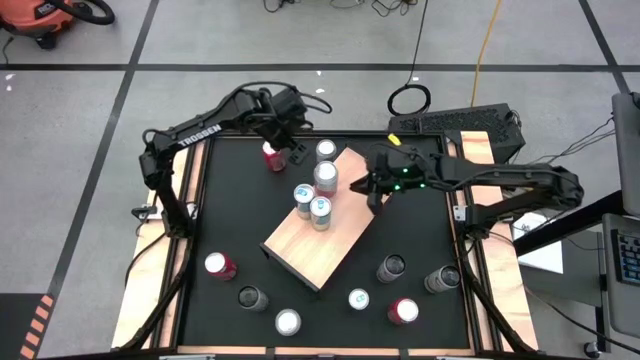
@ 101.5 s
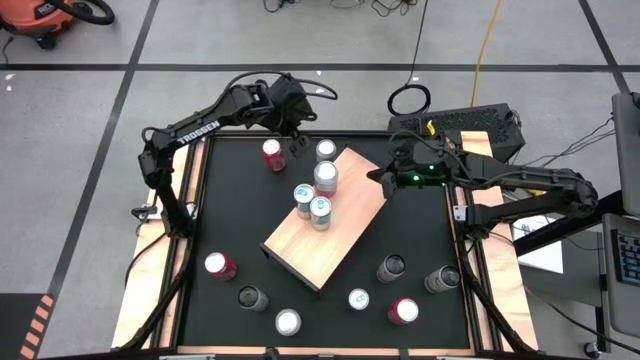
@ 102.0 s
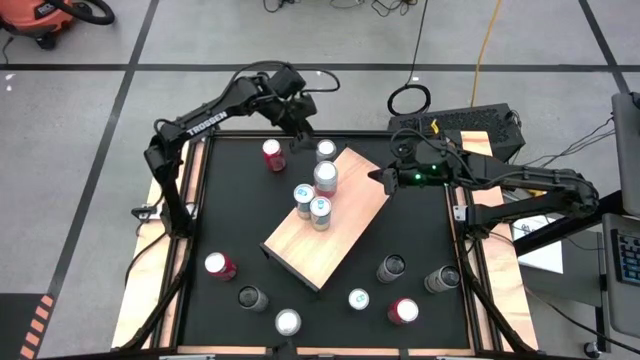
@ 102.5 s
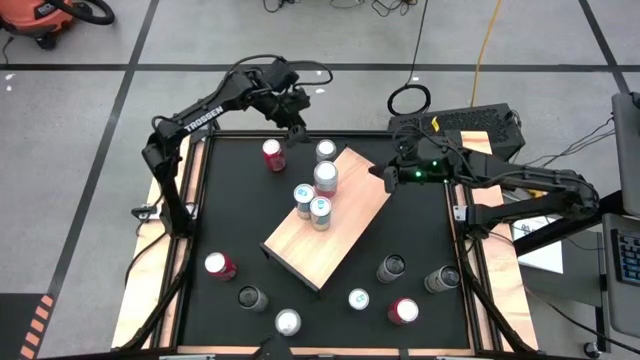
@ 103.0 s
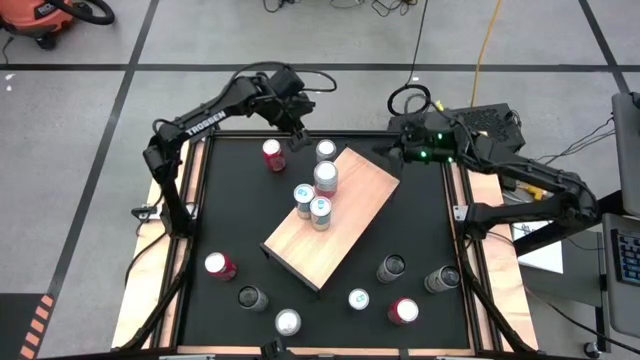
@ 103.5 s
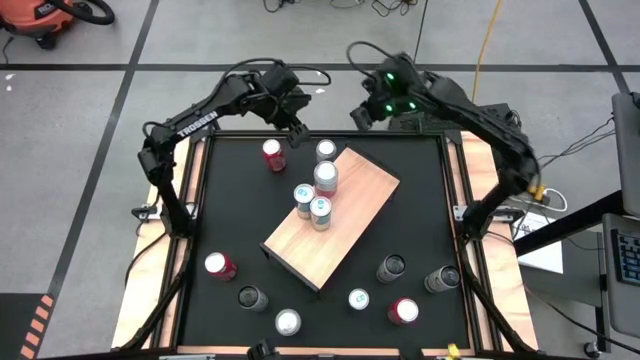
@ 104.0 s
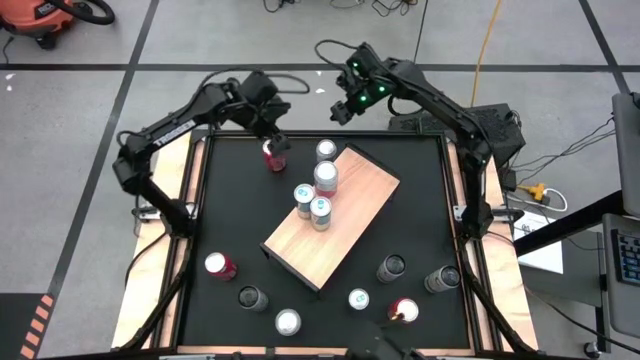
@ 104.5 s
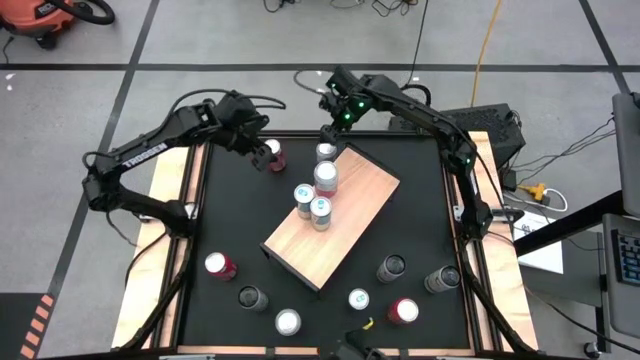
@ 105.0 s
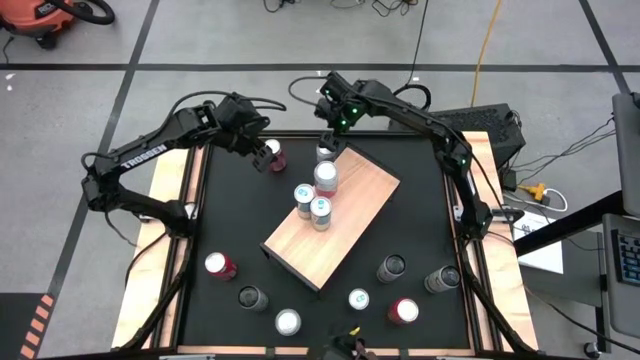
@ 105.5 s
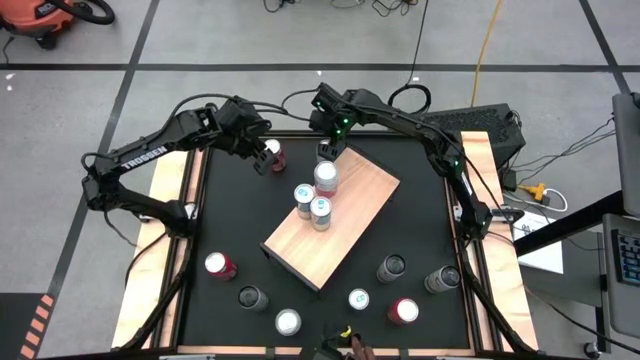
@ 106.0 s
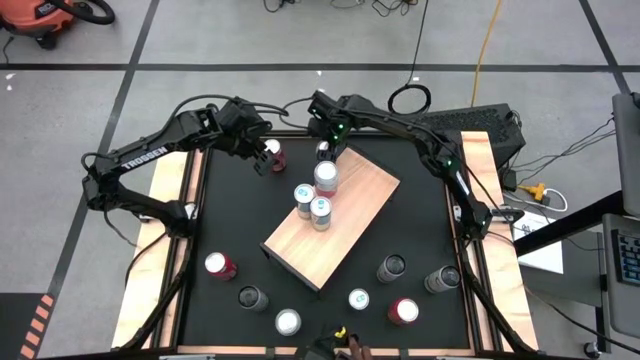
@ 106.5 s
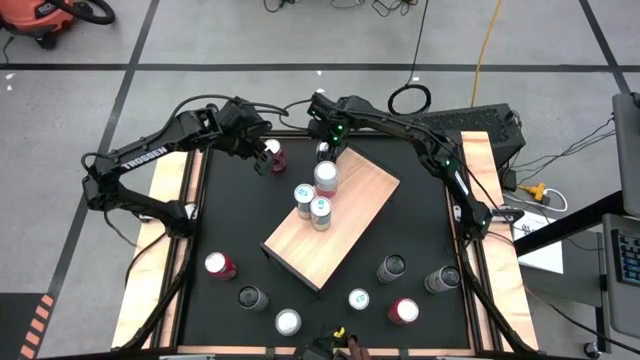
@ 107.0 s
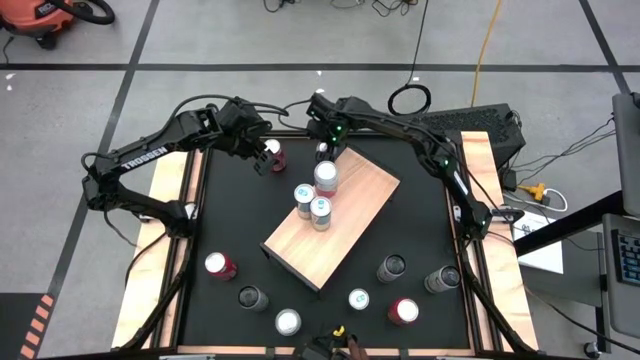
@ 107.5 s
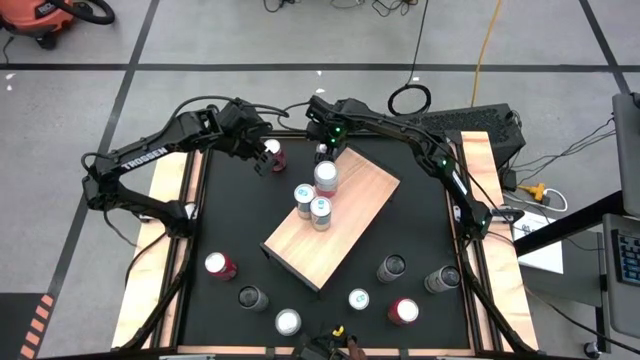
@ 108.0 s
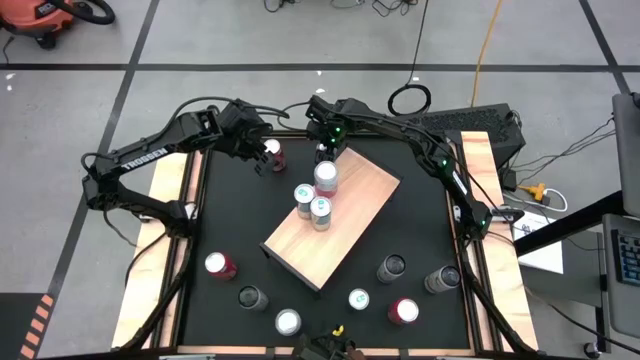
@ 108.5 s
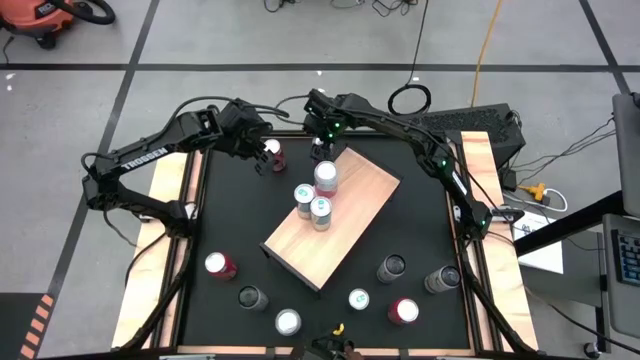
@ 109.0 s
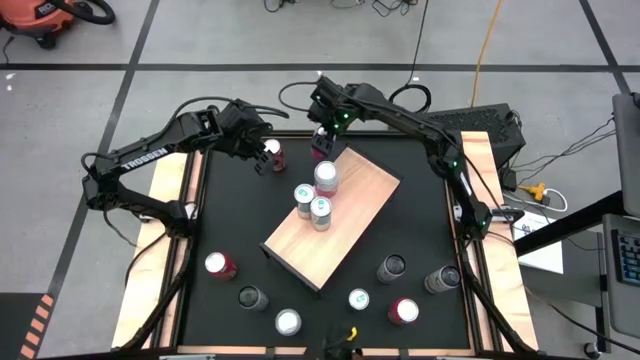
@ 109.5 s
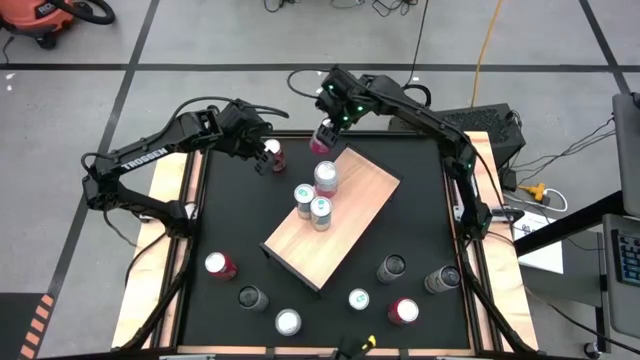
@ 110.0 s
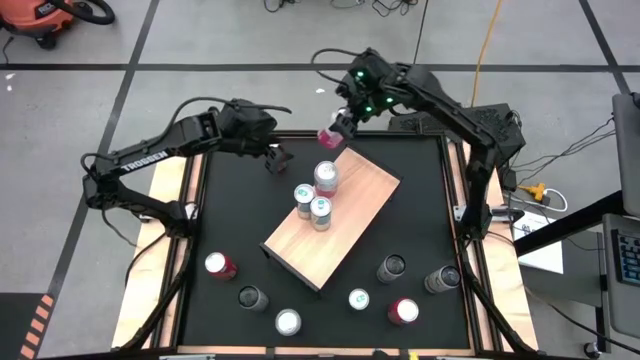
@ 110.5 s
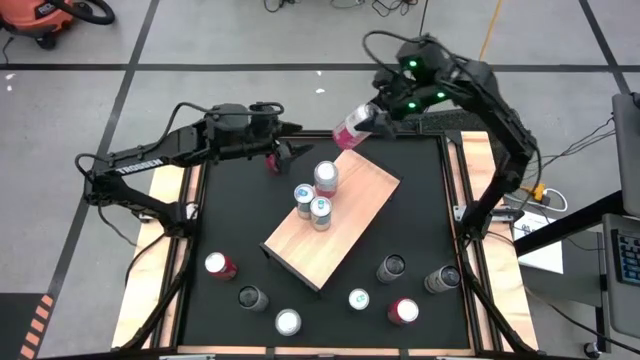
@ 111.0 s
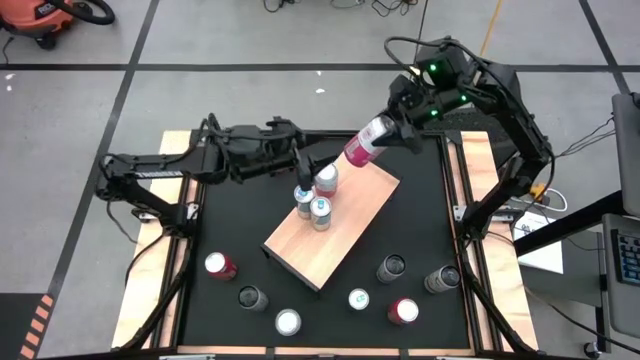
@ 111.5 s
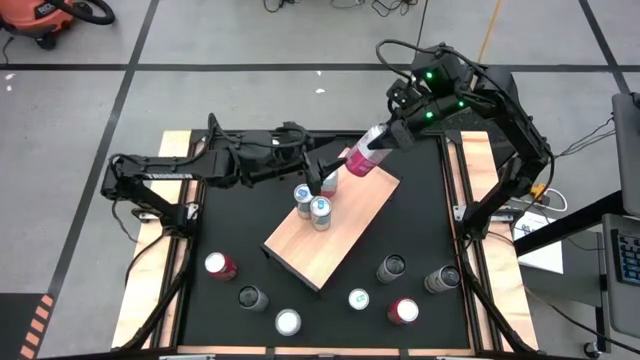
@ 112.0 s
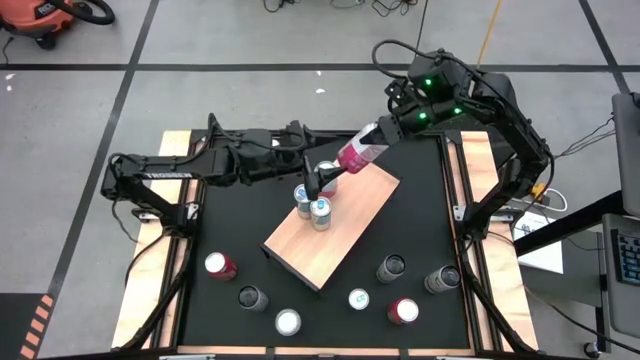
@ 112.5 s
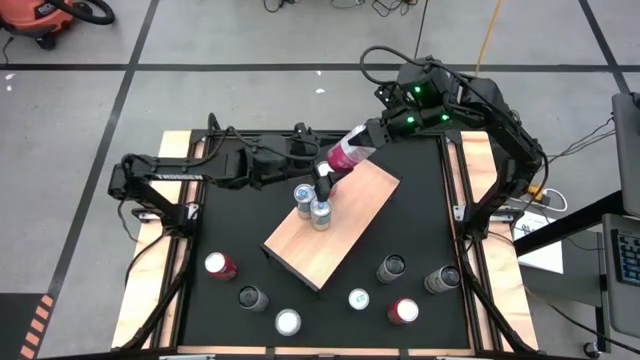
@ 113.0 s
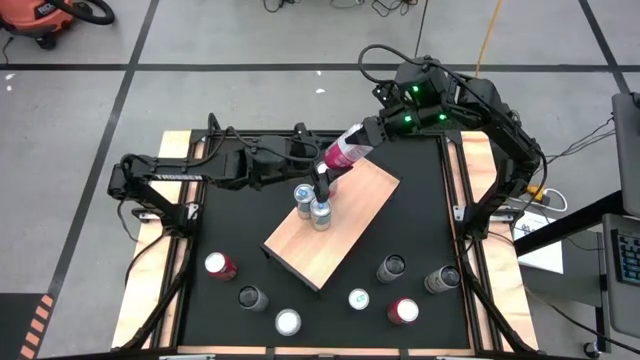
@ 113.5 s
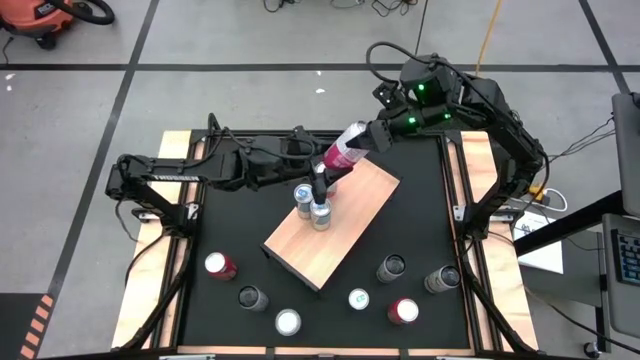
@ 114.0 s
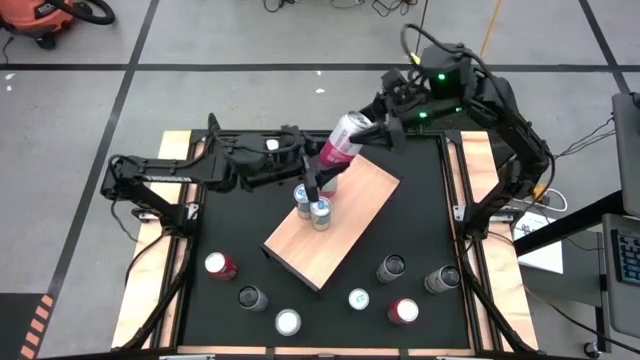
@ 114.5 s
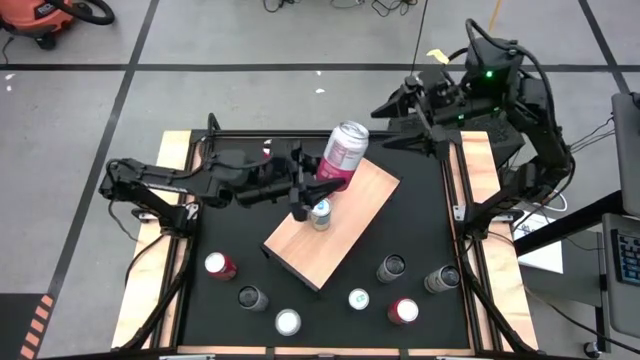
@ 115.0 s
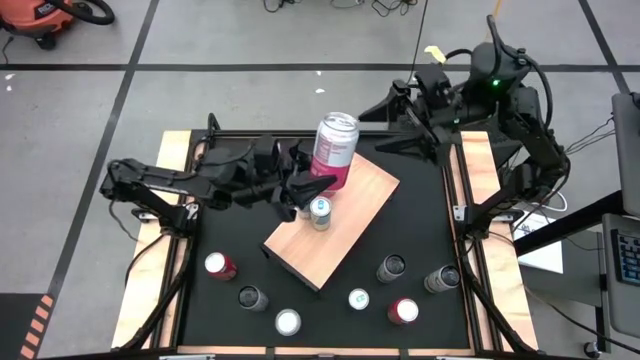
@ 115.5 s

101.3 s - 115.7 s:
Task: Place canned beverage on shelf
Put the top pink-white soda can on the shelf aligned with the pink-white soda can

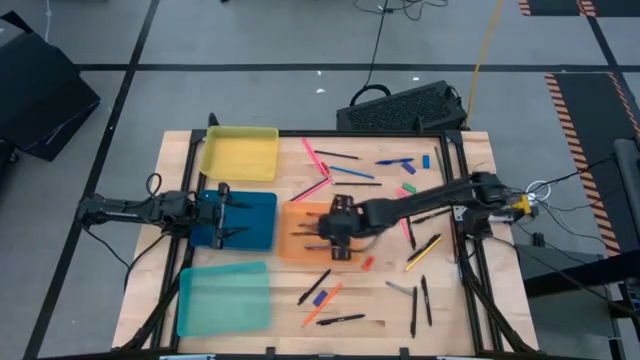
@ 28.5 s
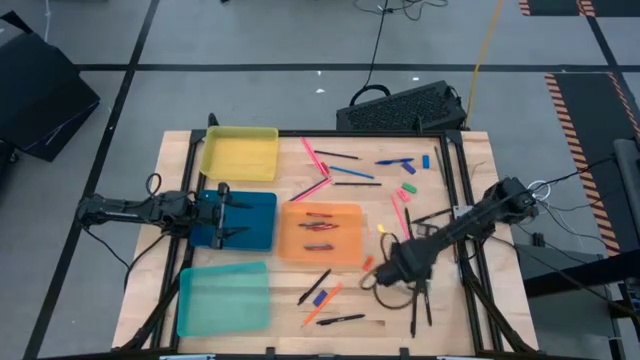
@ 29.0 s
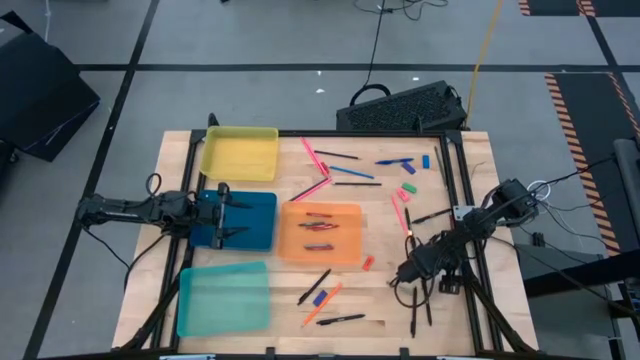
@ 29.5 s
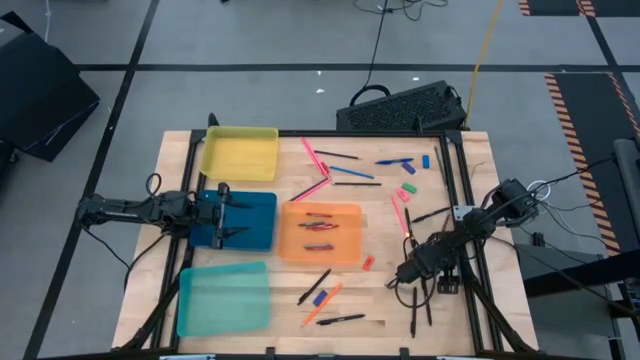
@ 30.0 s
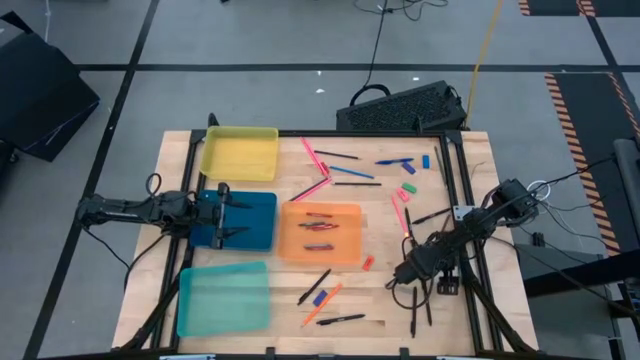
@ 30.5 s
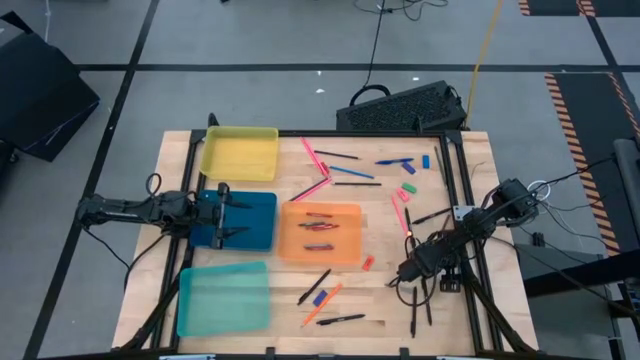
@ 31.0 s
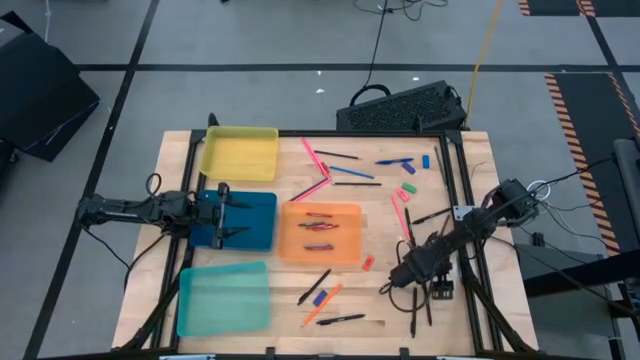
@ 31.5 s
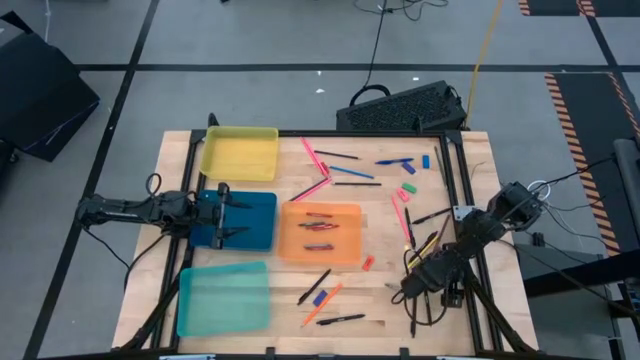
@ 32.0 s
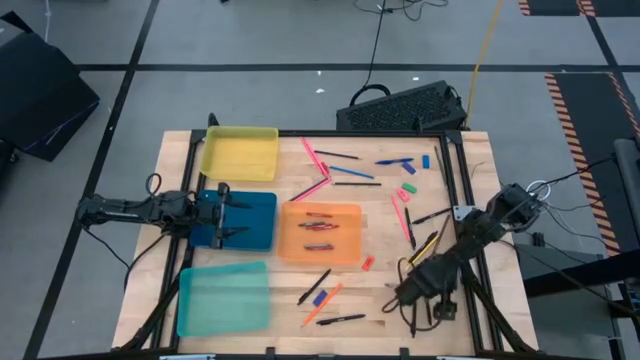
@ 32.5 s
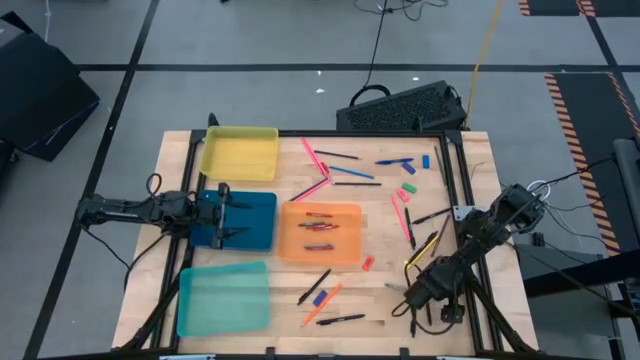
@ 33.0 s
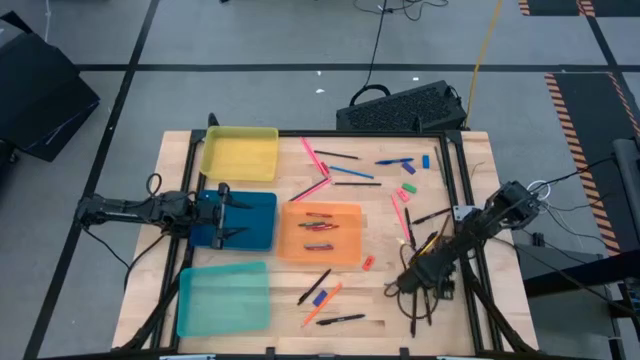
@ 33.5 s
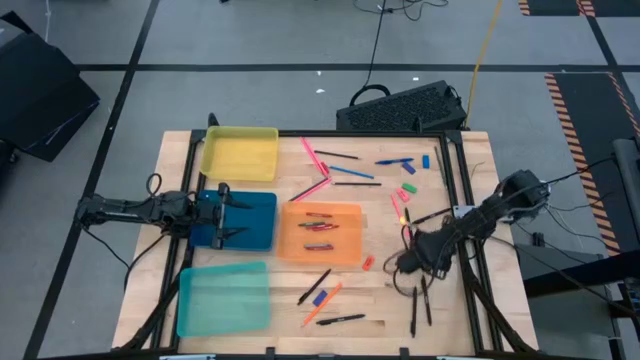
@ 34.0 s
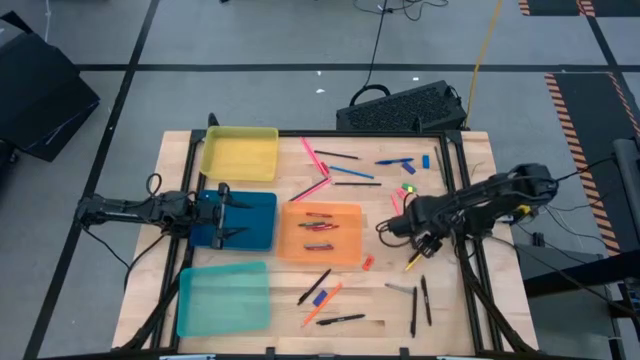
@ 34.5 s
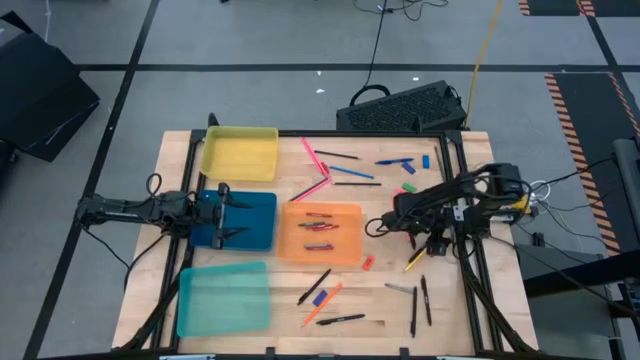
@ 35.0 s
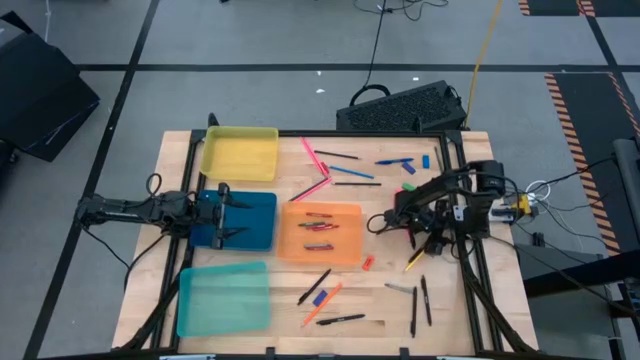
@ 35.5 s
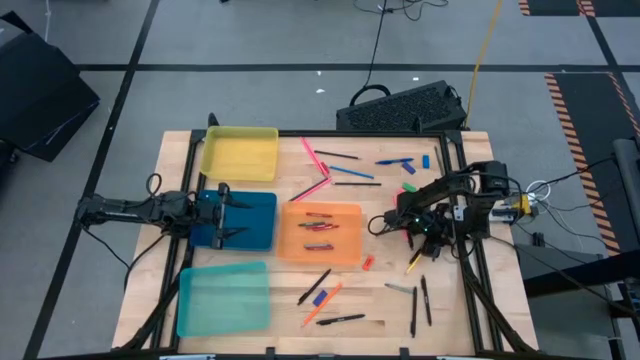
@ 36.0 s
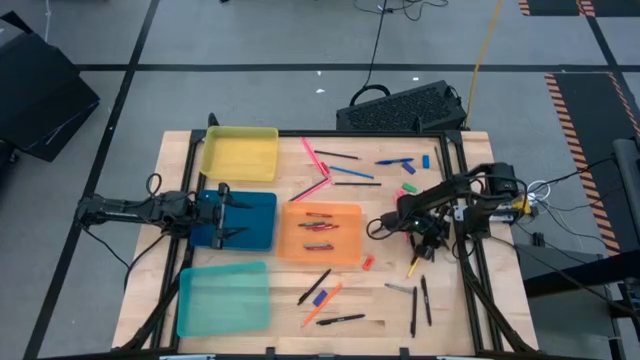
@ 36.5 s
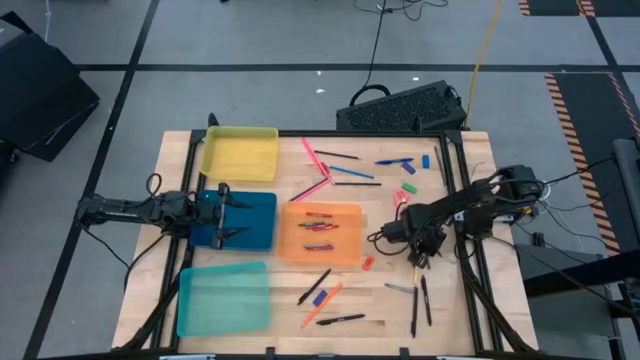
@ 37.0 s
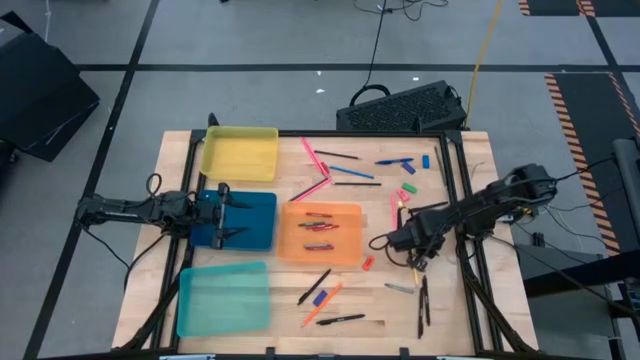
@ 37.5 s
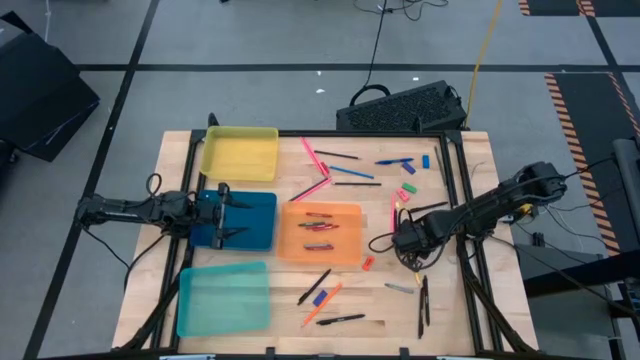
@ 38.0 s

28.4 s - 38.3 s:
Task: Sort crayons/erasers/pens/pencils in bins
Put the green crayon into the orange bin
